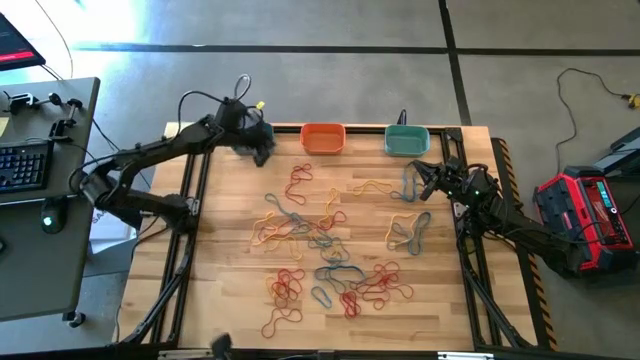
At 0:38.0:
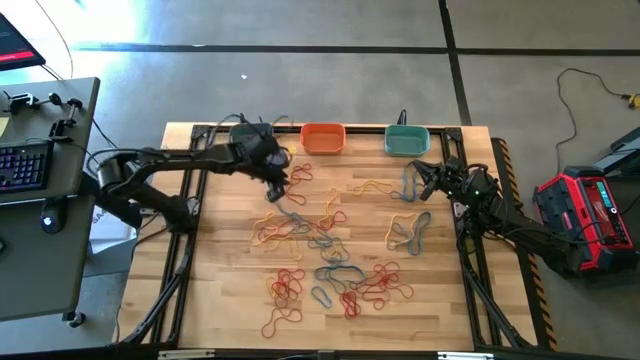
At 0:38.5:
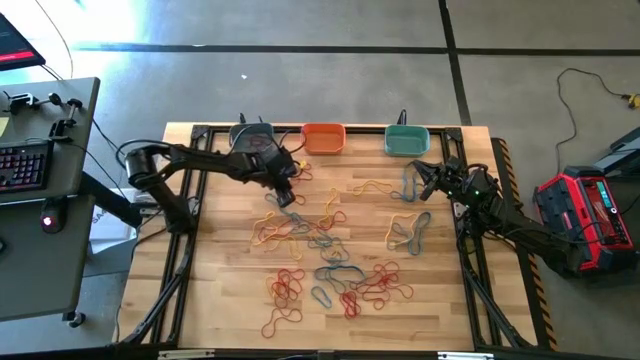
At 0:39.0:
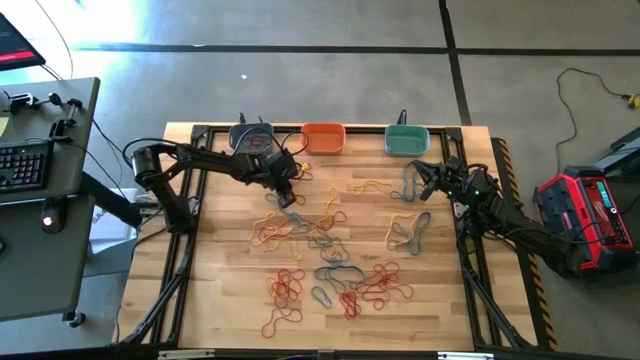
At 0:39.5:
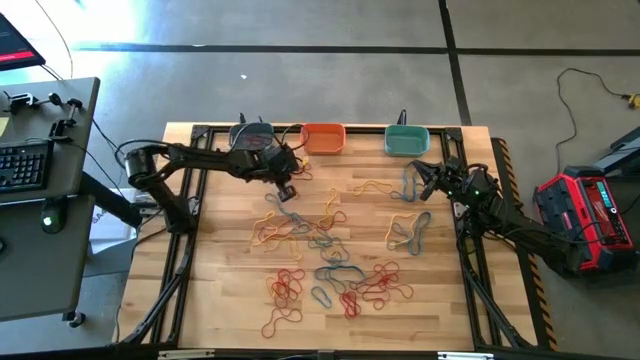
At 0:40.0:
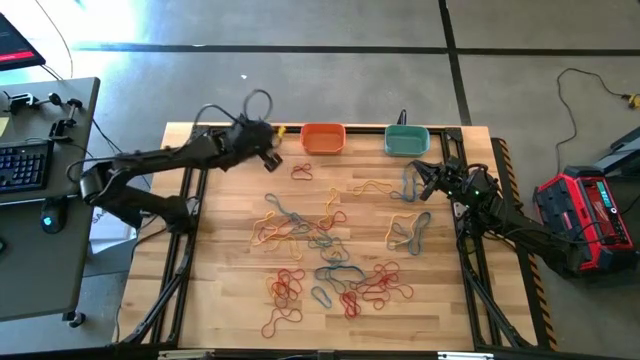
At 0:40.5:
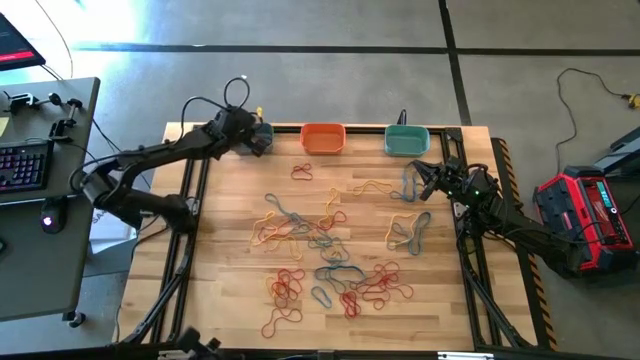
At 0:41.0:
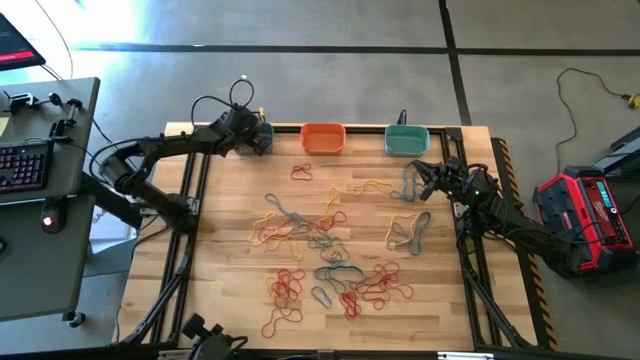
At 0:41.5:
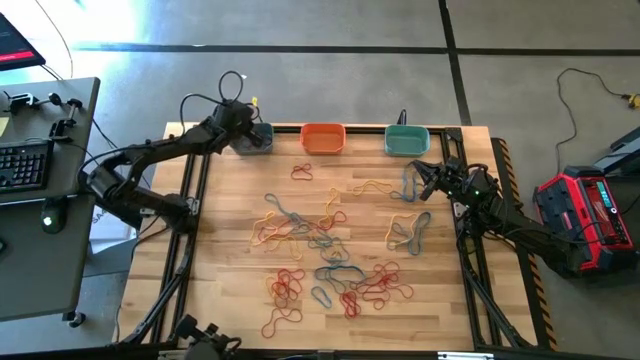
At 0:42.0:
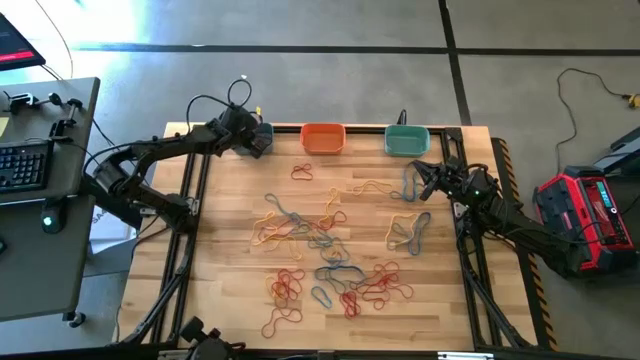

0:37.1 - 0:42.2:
Task: Sort rubber bands into baskets
Put the red rubber band into the blue bin

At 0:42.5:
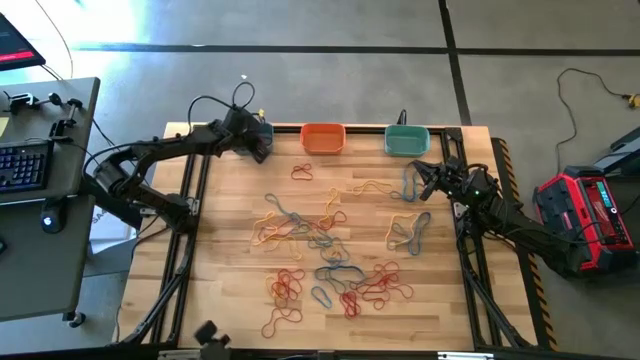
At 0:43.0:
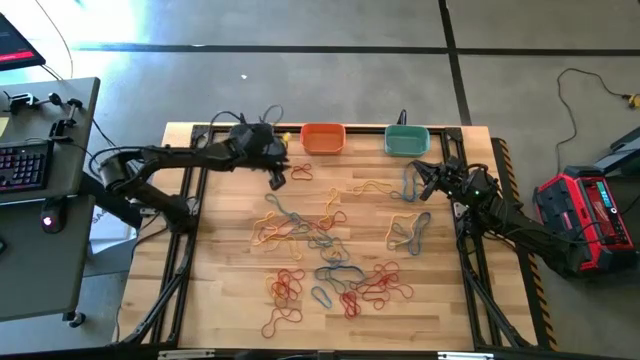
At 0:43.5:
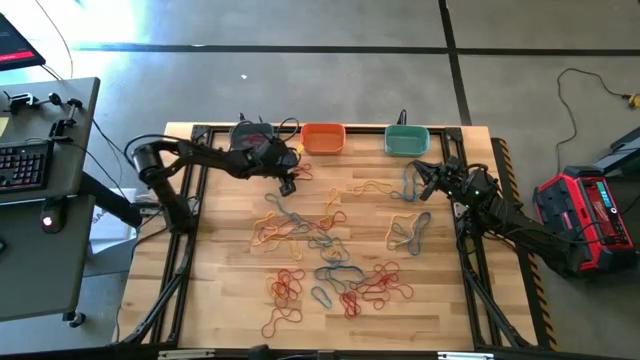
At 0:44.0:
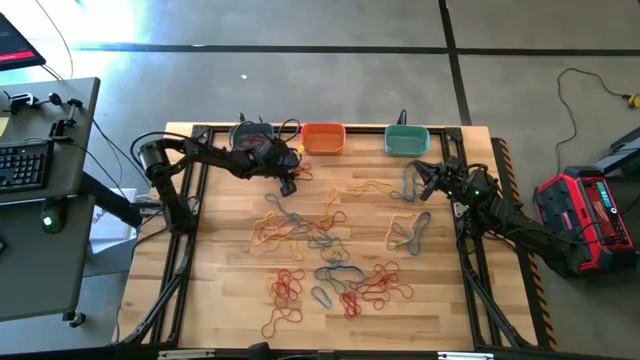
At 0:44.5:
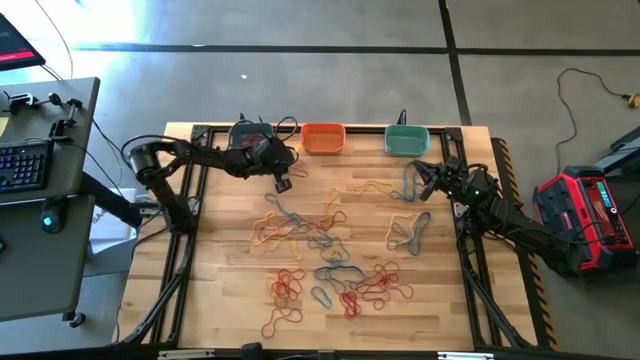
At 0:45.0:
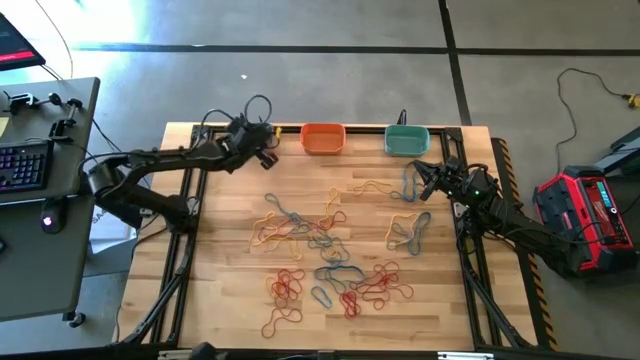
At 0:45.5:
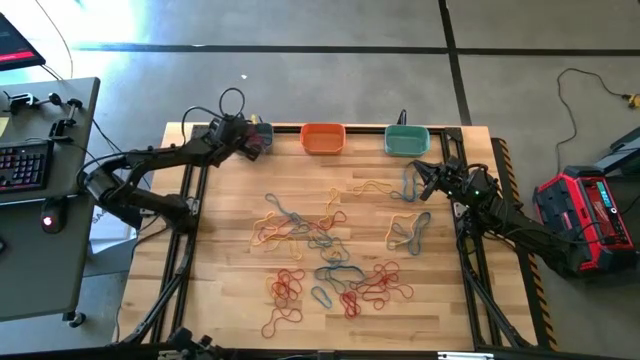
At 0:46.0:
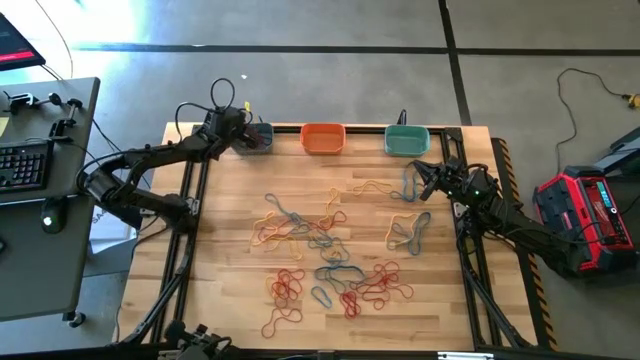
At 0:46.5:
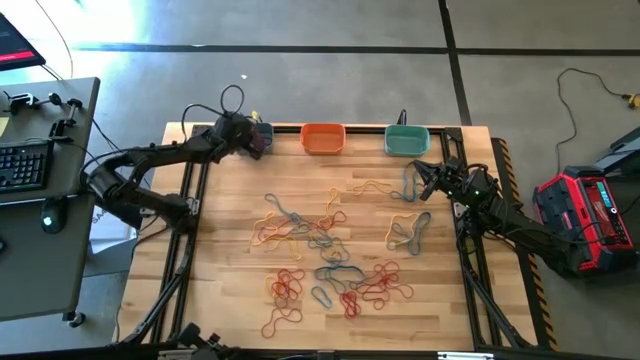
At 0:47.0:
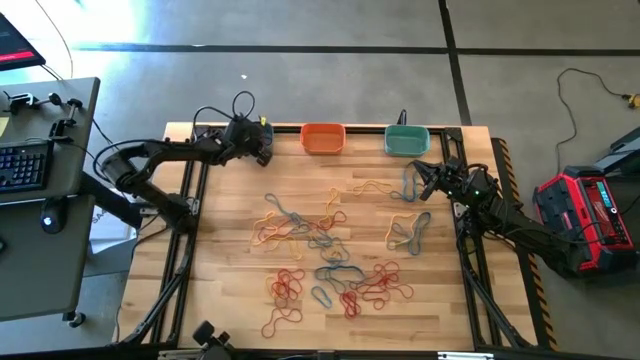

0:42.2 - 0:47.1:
Put the red rubber band into the blue bin

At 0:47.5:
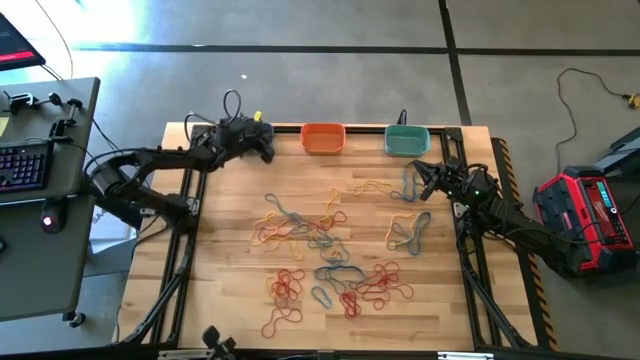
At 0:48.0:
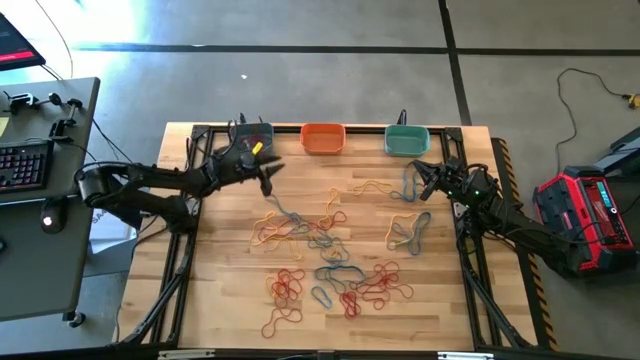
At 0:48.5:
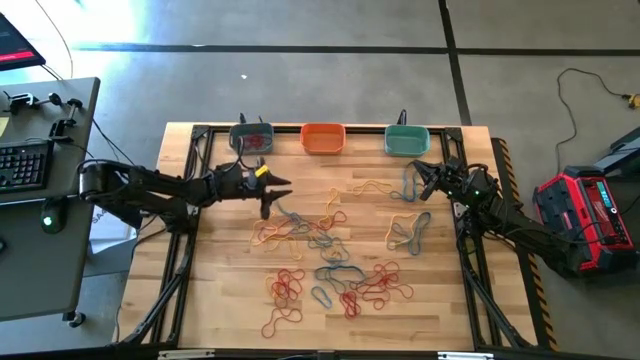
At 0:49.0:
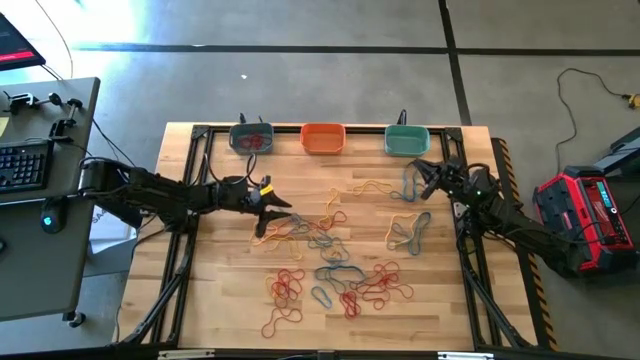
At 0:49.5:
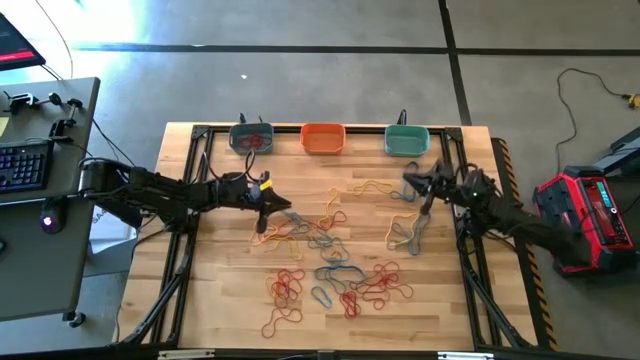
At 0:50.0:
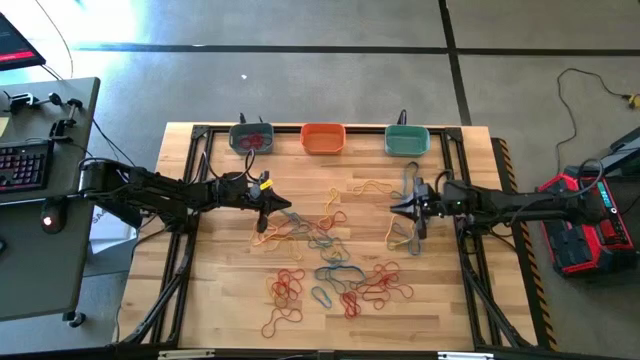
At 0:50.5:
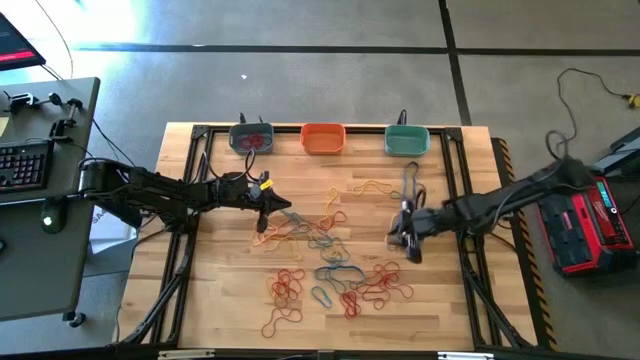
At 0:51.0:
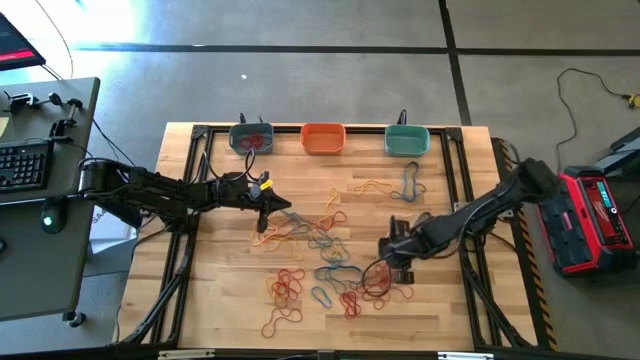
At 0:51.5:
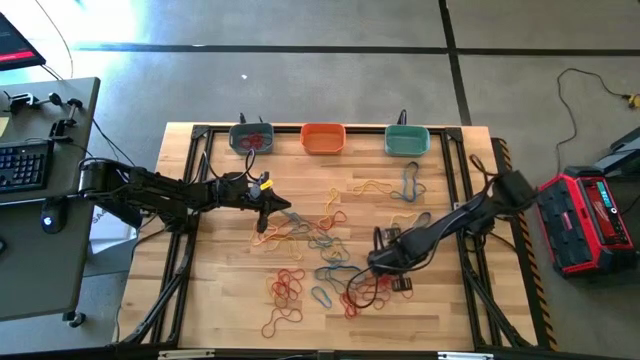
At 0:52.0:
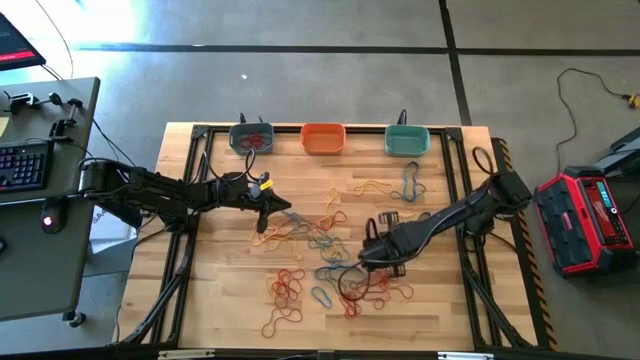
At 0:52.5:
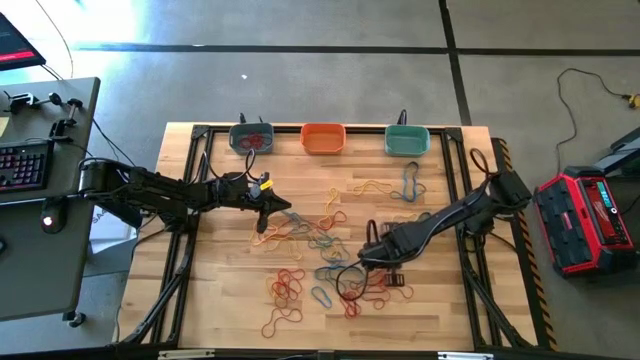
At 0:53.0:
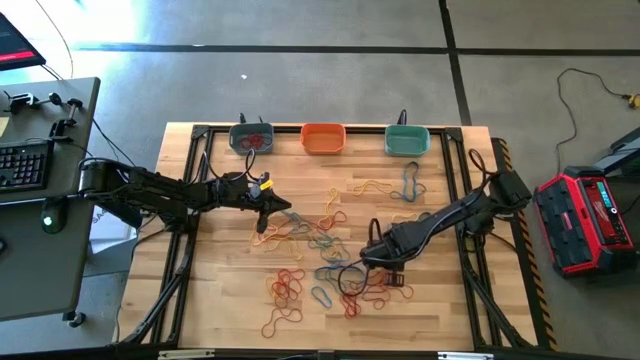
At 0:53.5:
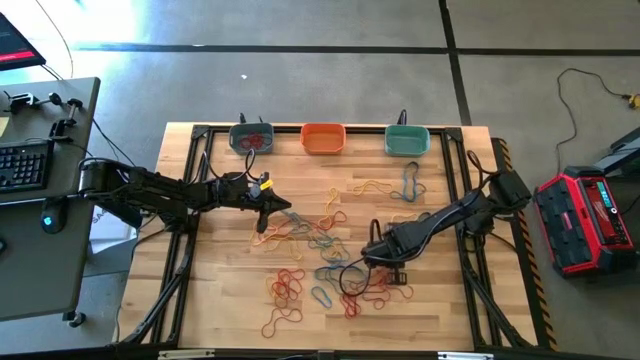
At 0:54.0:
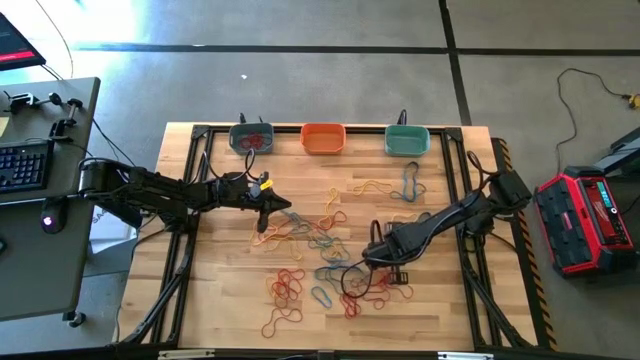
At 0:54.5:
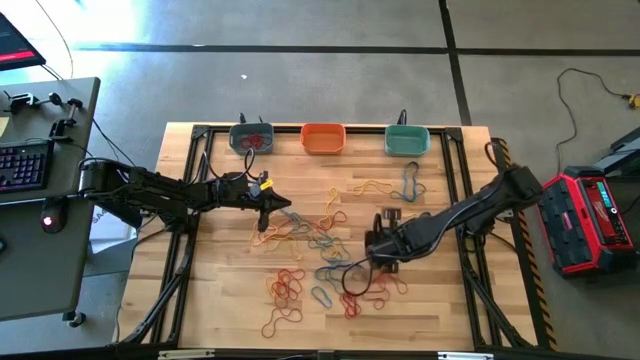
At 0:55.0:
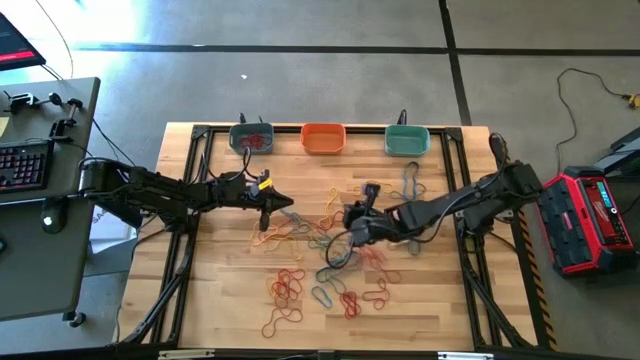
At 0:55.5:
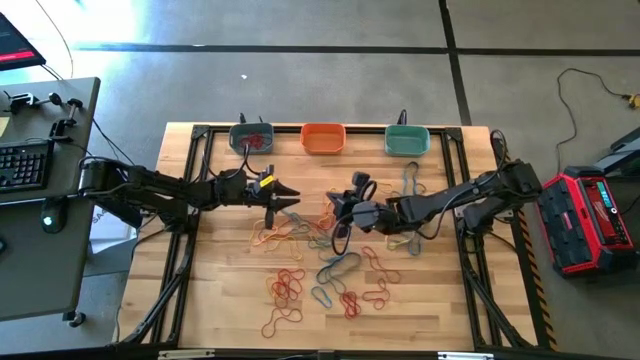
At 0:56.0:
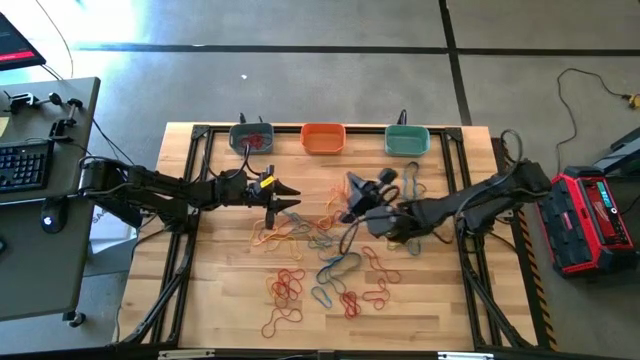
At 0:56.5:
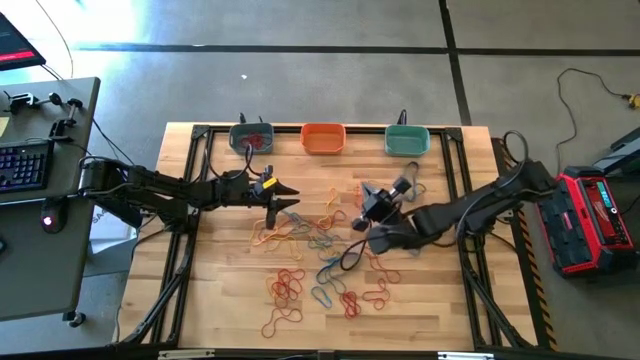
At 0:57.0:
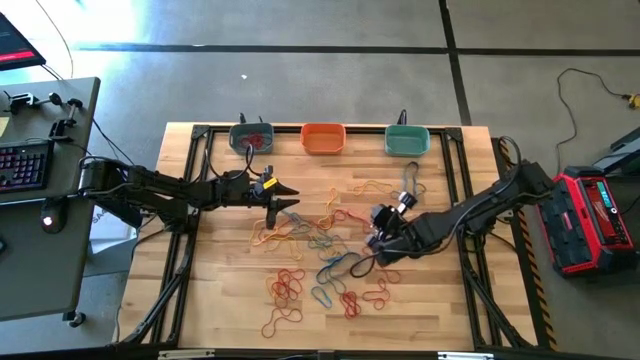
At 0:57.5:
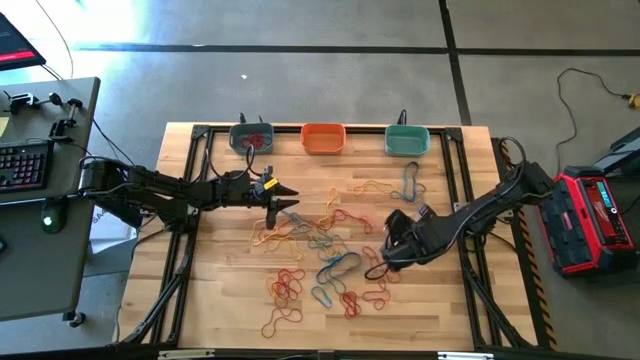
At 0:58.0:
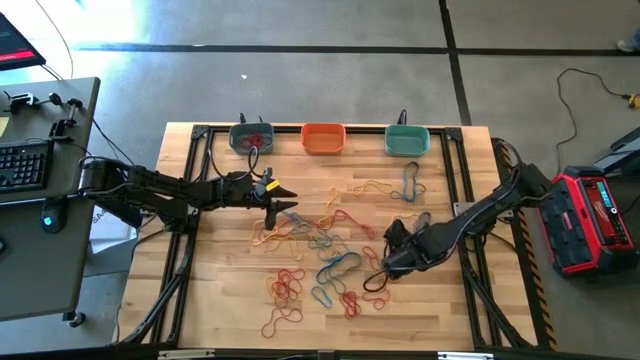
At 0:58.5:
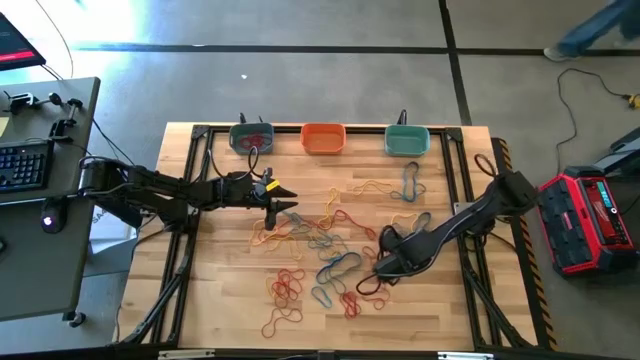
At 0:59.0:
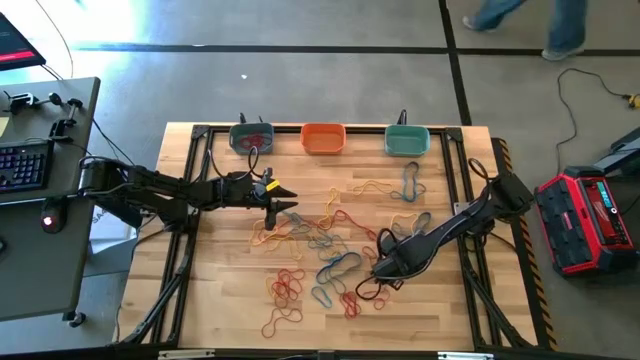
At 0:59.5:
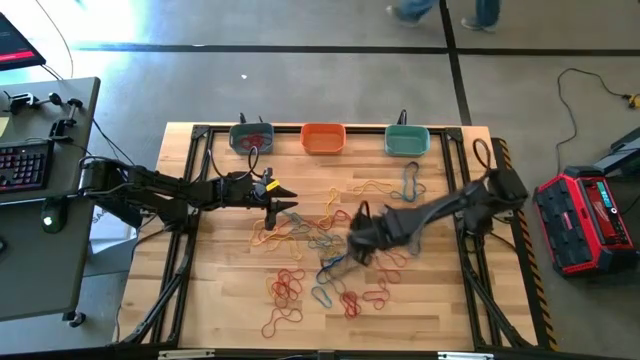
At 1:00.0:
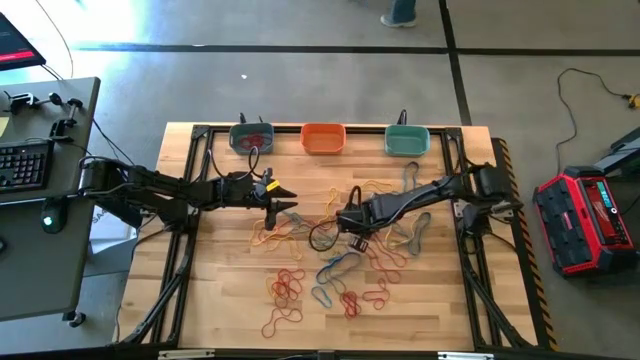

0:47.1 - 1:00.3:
Put the red rubber band into the blue bin
